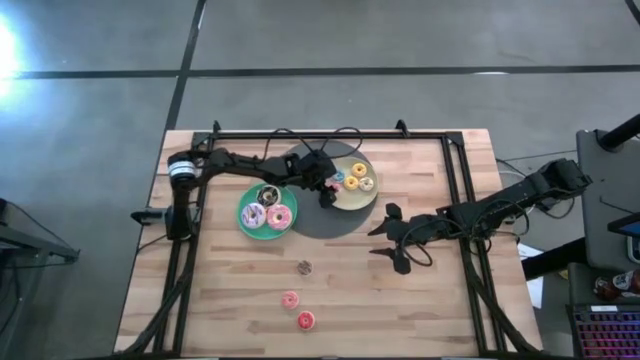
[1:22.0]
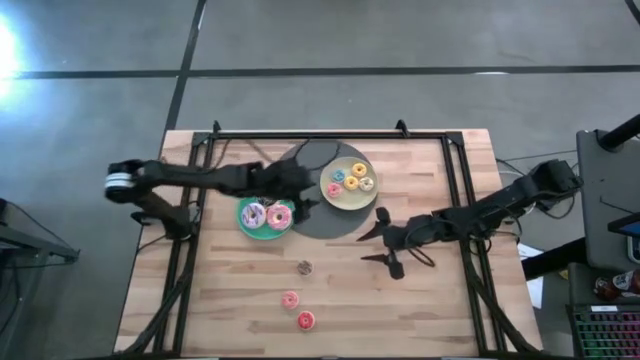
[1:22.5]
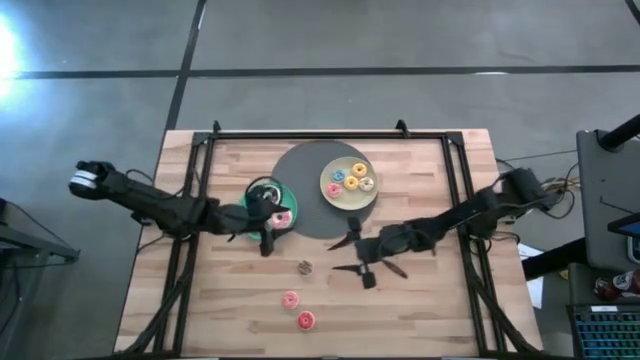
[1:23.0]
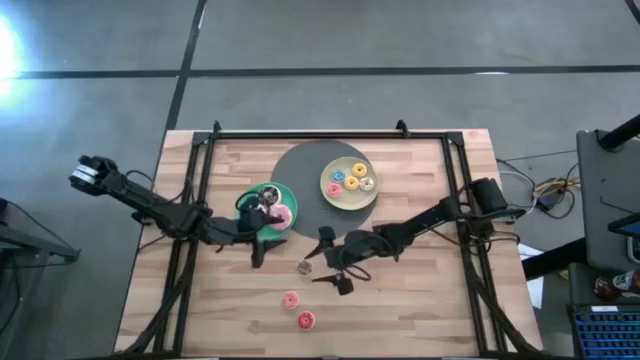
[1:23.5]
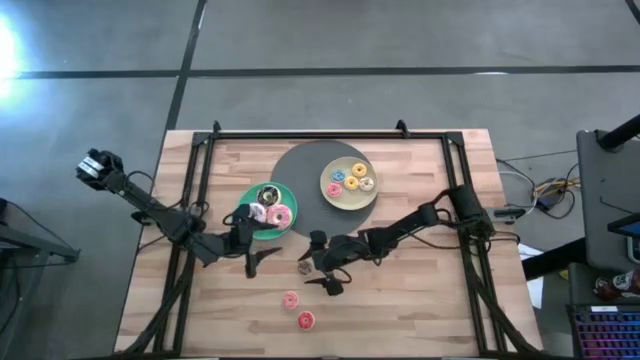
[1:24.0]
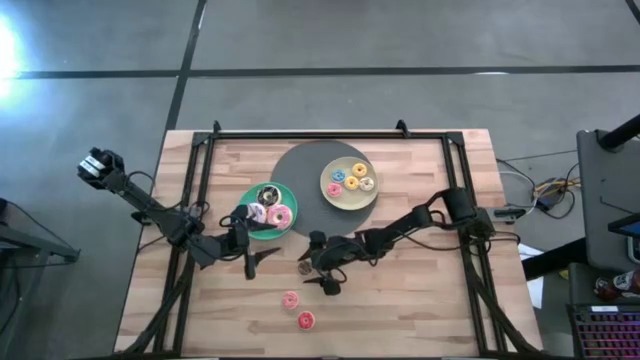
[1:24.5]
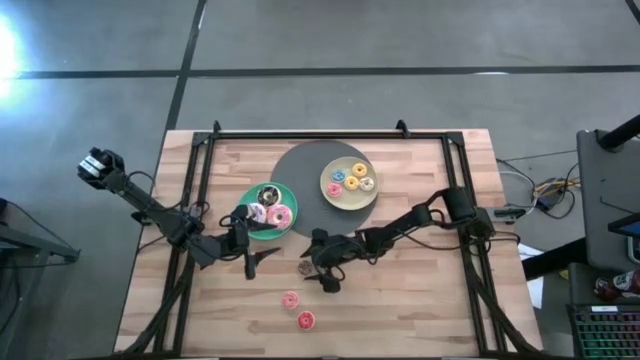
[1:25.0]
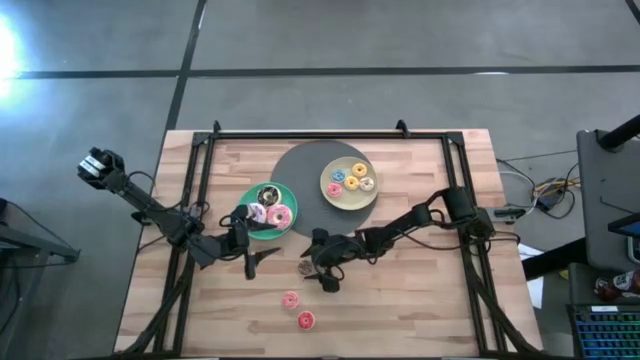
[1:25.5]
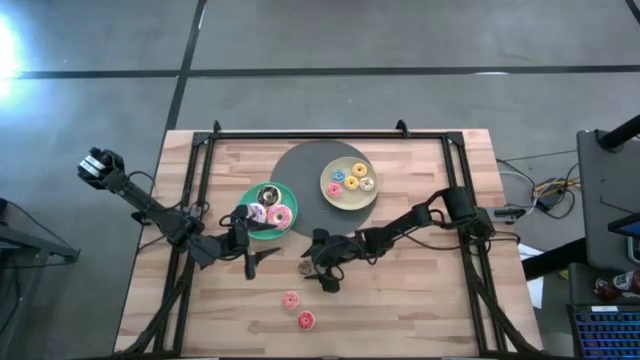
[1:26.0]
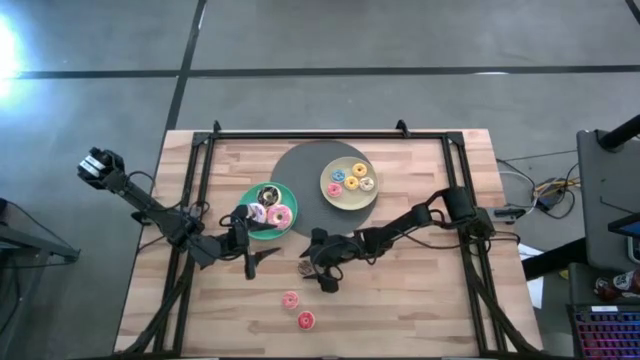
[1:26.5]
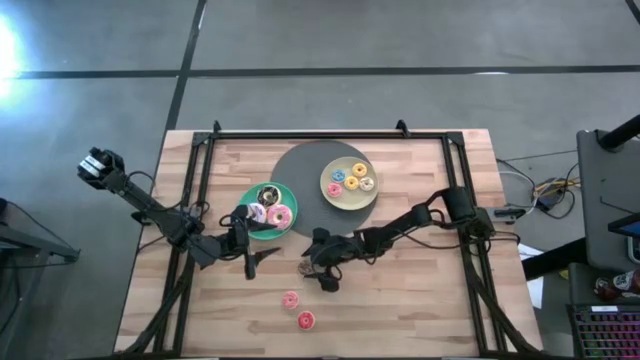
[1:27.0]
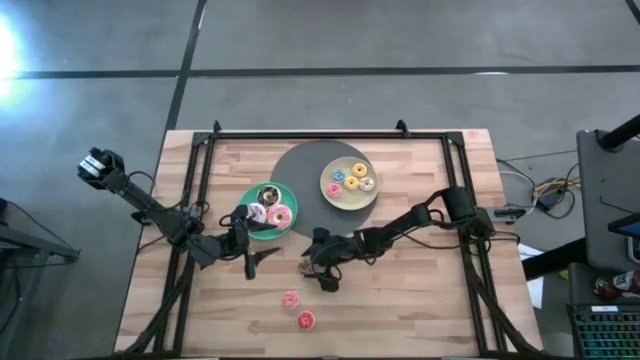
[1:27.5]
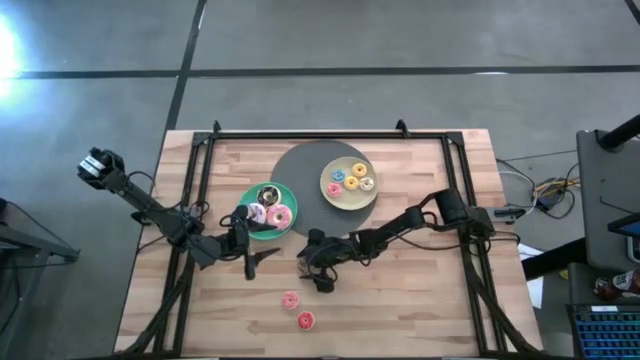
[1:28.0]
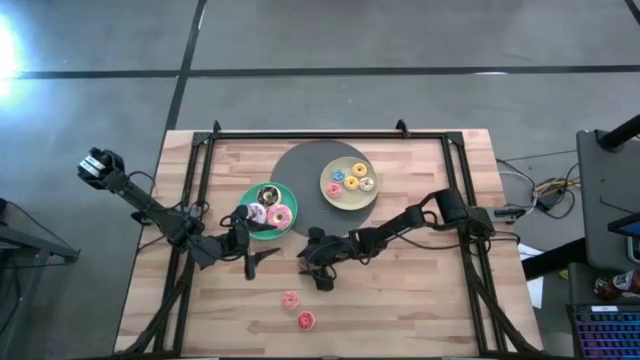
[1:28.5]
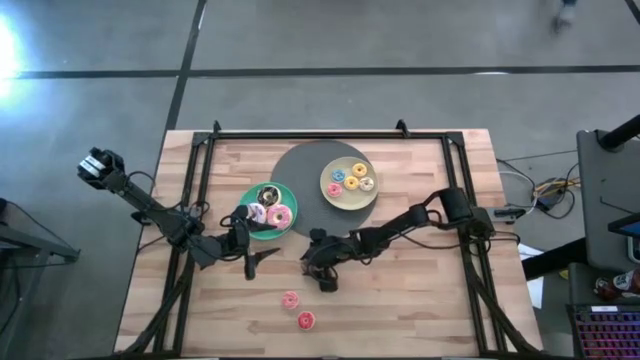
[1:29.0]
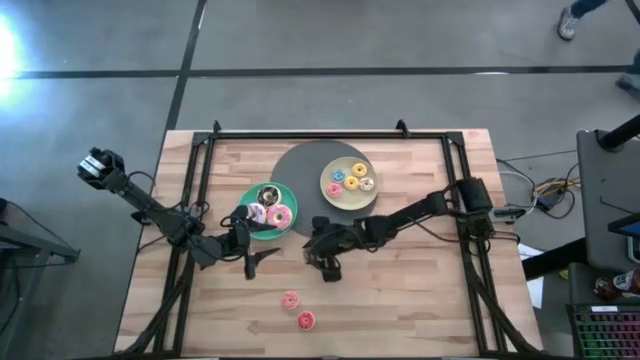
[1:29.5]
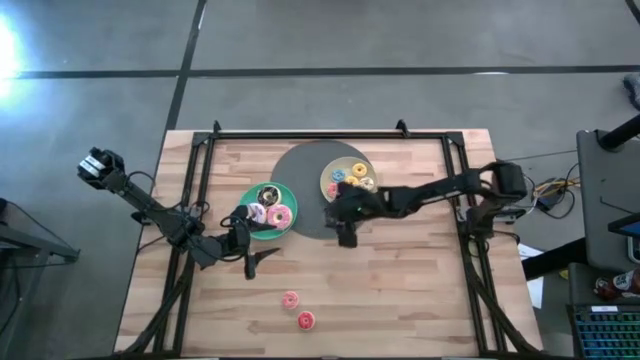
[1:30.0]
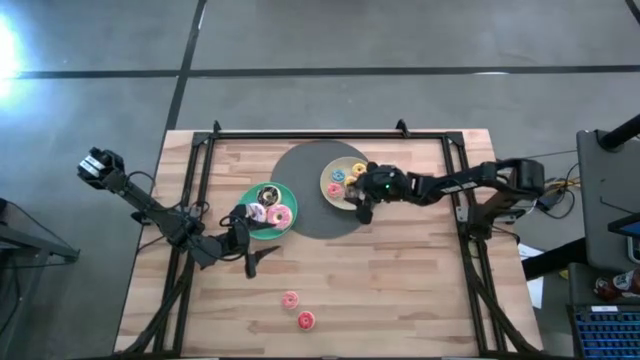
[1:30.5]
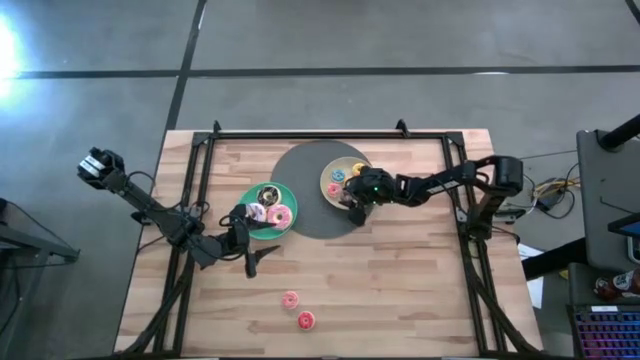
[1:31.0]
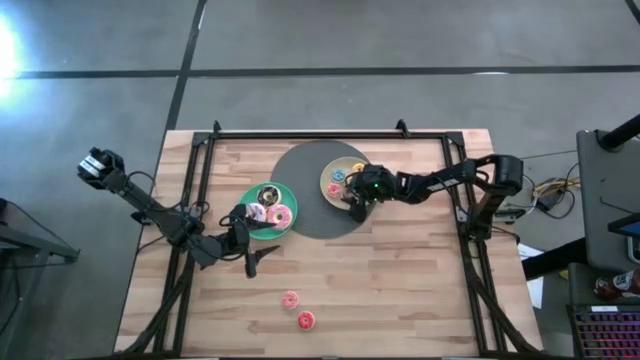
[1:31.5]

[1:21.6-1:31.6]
Task: Pick & Place donuts
Put the small brown donut on the brown plate

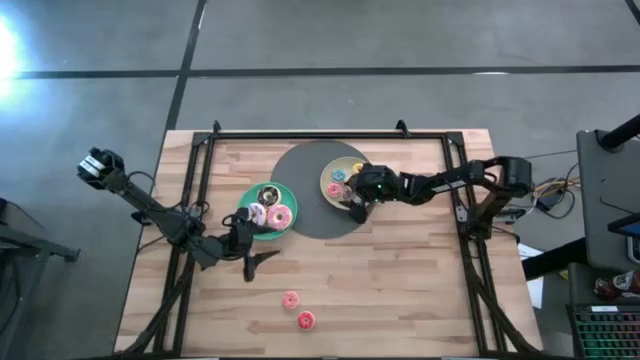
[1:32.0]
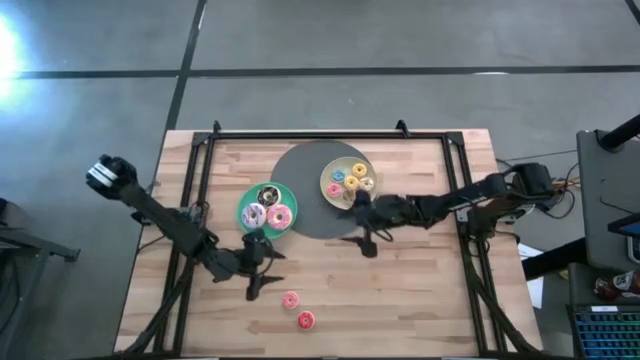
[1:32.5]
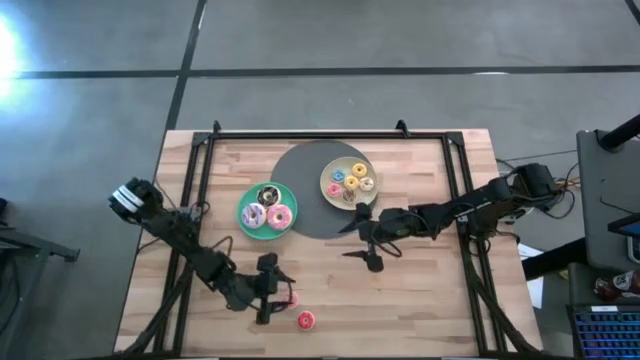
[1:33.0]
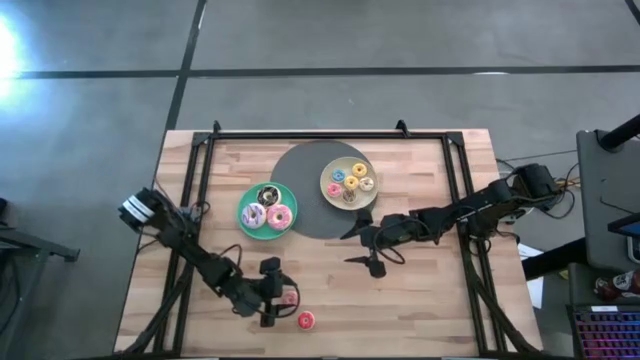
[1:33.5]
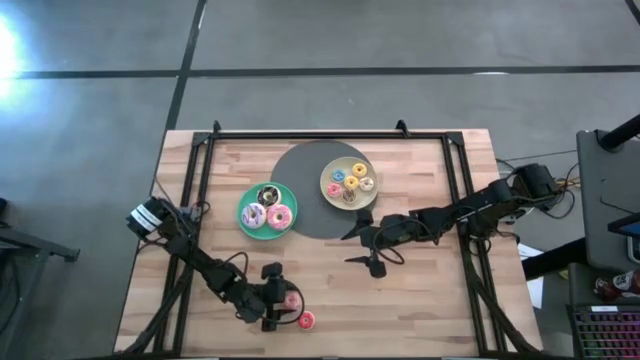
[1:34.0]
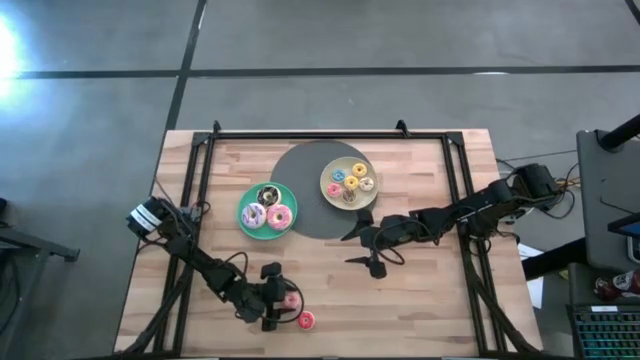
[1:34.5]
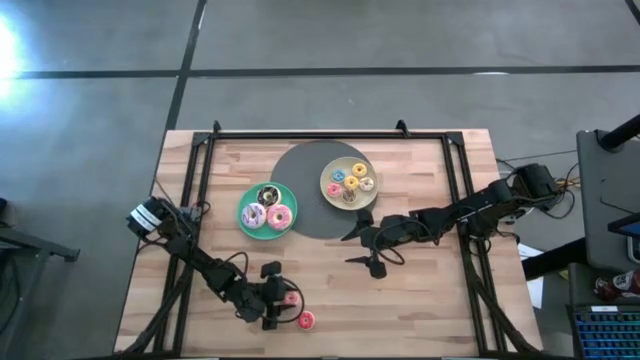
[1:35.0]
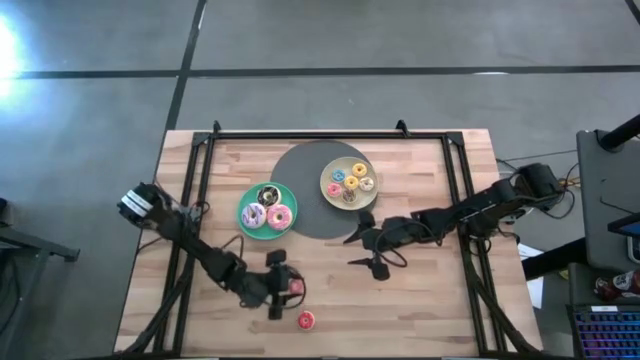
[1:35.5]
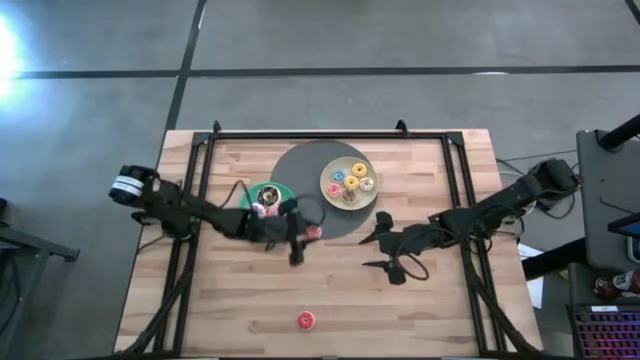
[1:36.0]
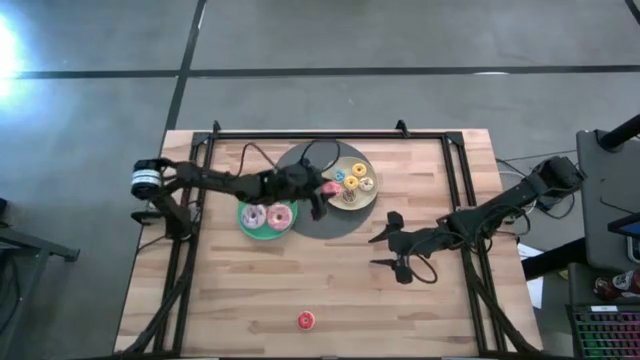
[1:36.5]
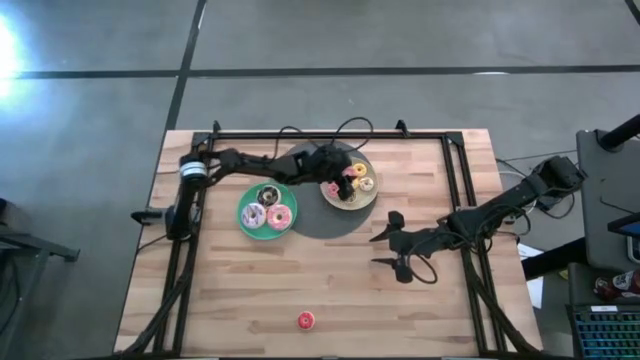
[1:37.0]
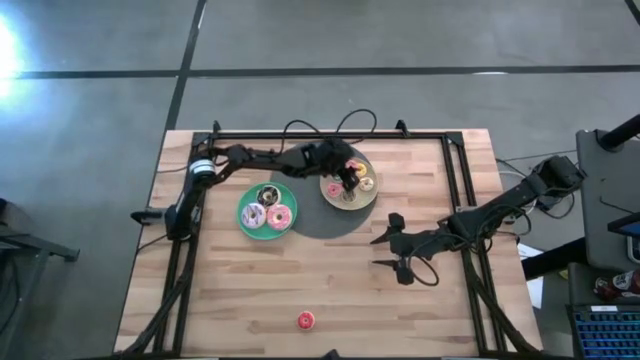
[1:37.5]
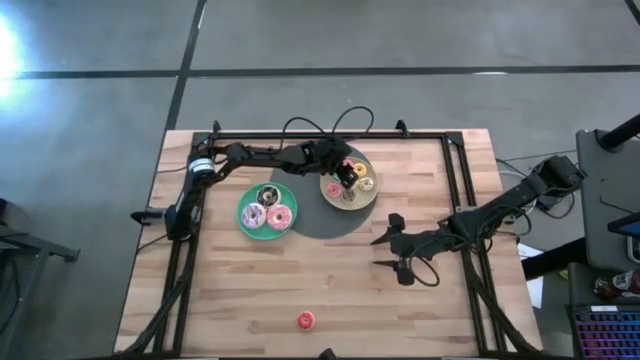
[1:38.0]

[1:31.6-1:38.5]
Put the small pink donut on the brown plate

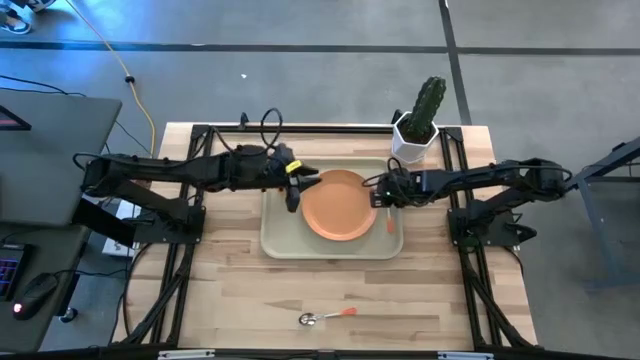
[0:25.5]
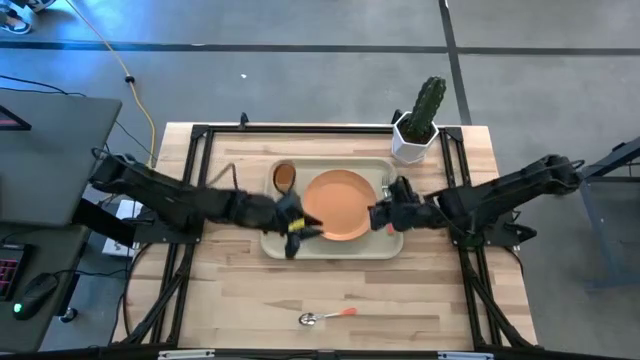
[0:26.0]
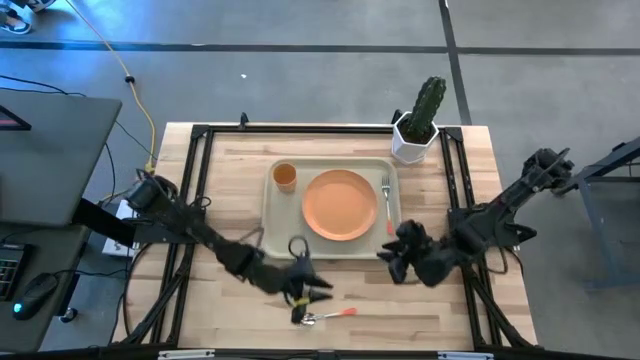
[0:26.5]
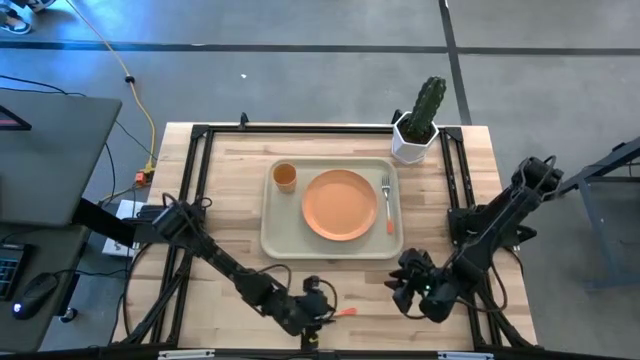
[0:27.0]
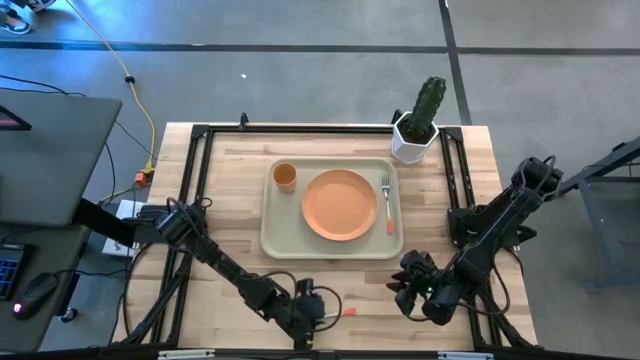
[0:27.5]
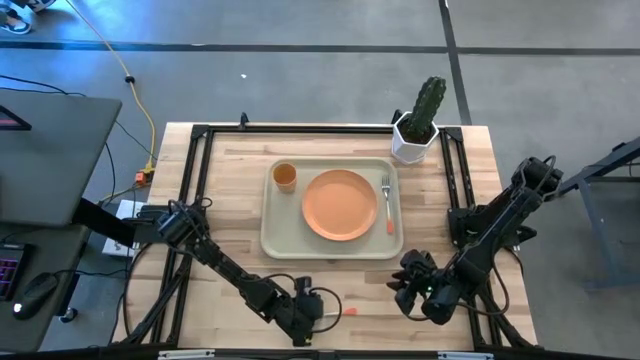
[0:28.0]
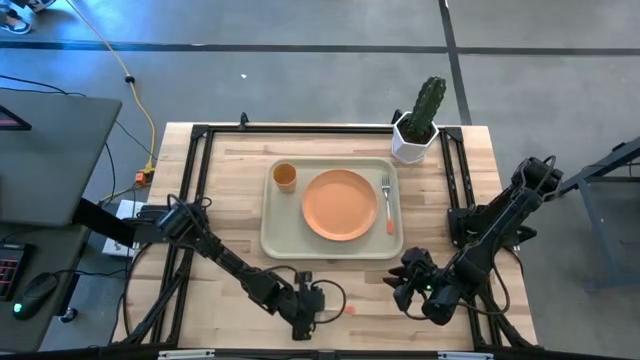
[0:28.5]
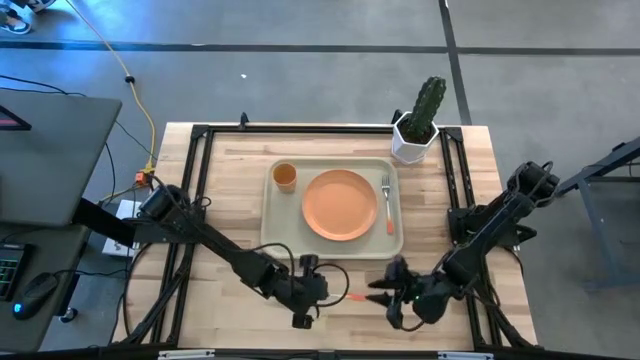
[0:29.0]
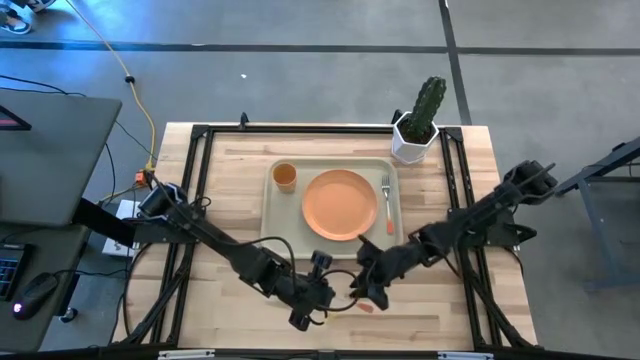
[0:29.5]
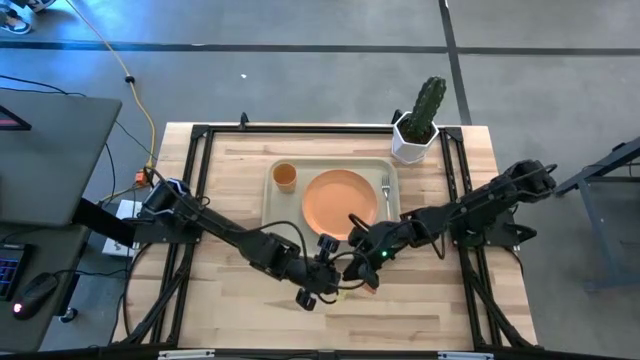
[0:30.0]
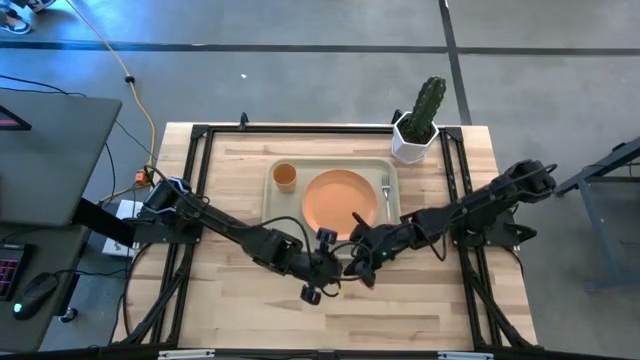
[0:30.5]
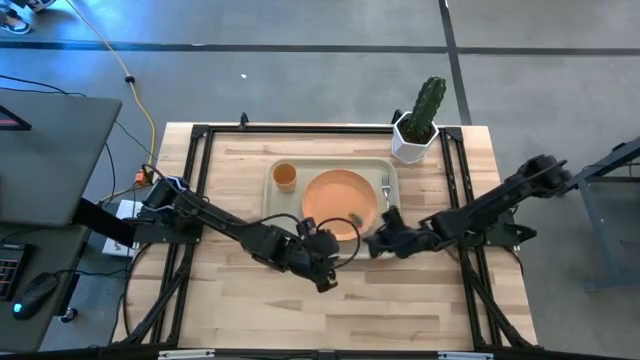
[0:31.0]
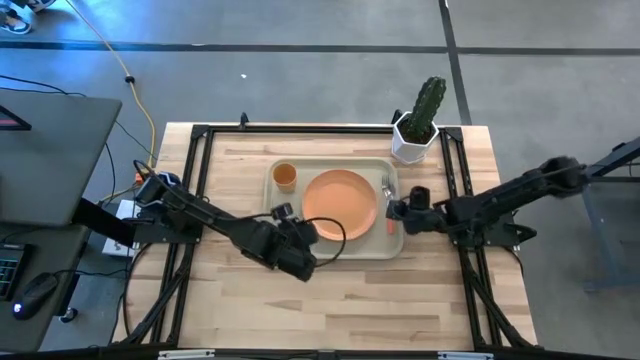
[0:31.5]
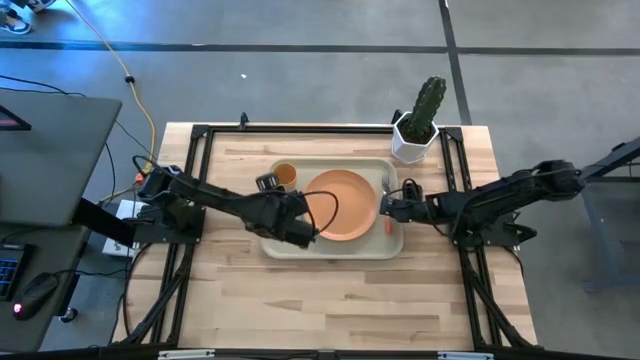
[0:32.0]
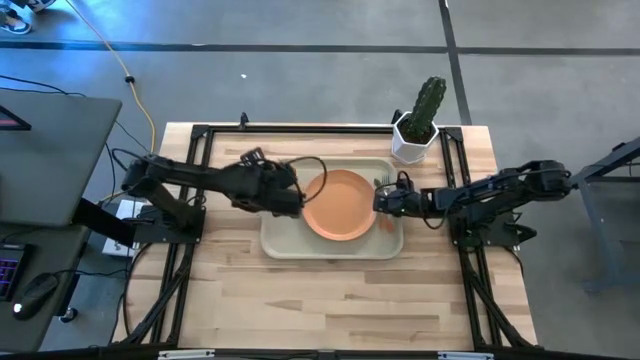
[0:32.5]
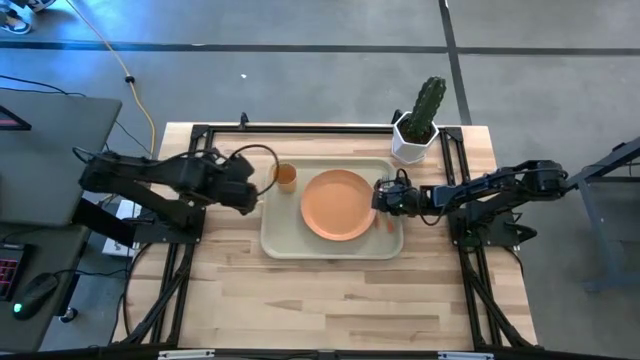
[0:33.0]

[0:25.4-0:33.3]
Task: Pick and place plate/cup/fork/spoon on tray
Put the orange spoon to the left side of the orange fork on the light brown tray
